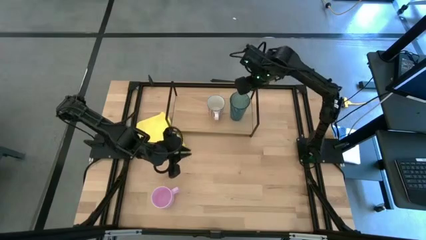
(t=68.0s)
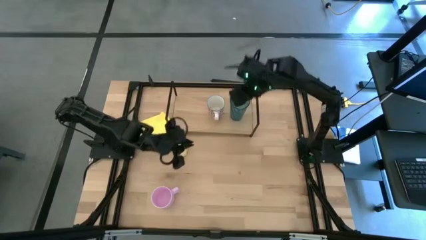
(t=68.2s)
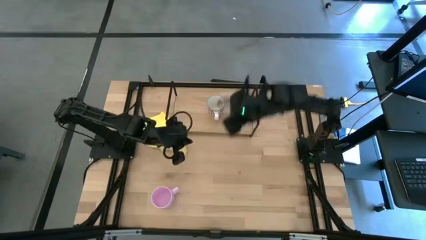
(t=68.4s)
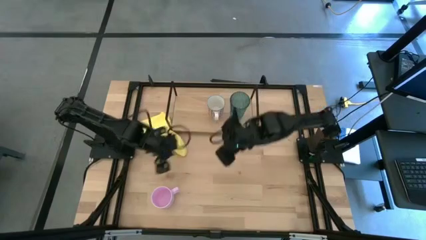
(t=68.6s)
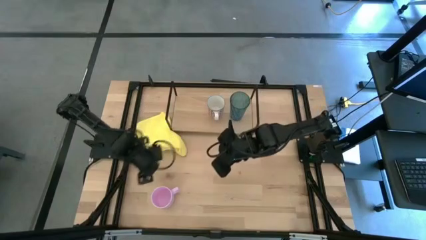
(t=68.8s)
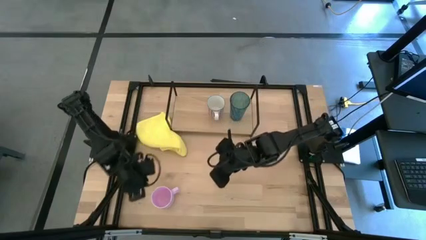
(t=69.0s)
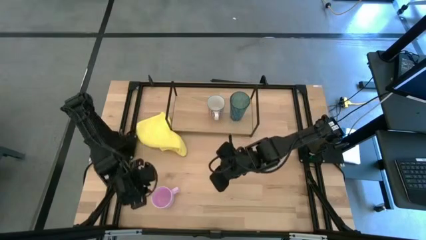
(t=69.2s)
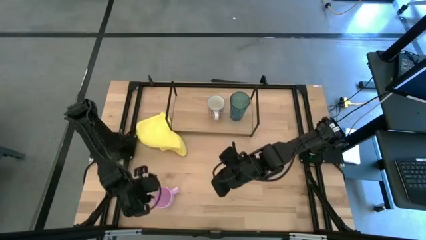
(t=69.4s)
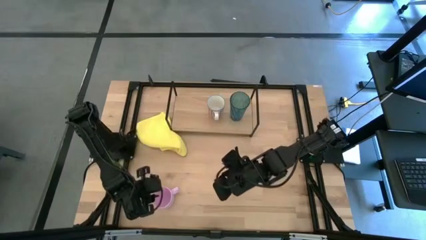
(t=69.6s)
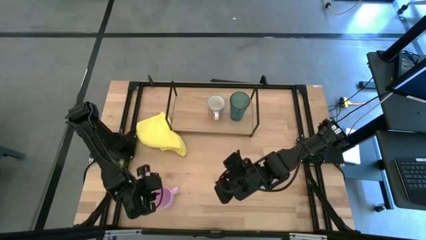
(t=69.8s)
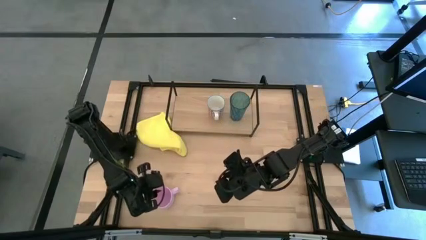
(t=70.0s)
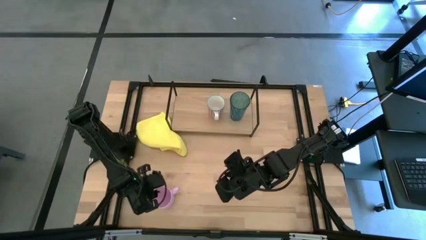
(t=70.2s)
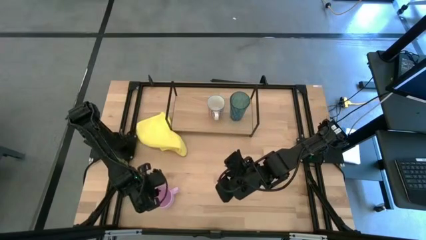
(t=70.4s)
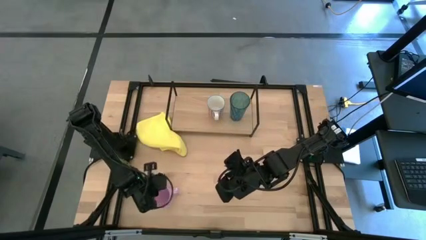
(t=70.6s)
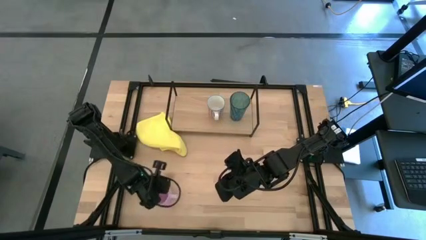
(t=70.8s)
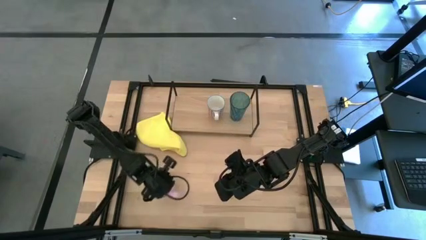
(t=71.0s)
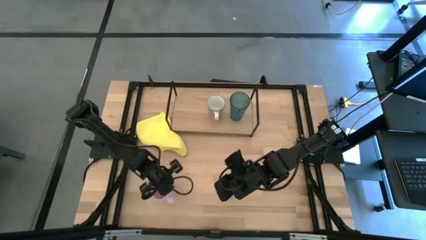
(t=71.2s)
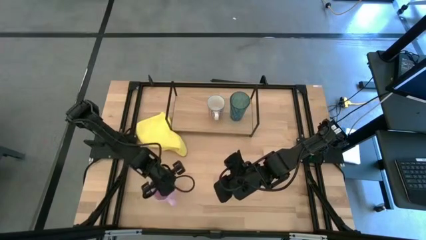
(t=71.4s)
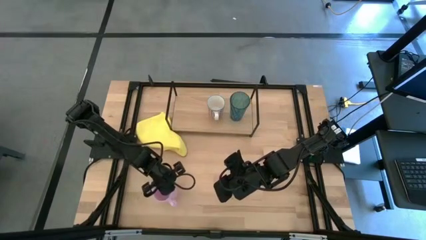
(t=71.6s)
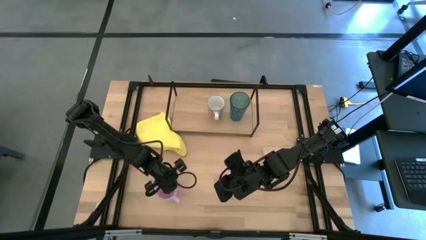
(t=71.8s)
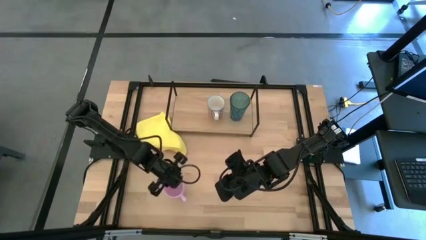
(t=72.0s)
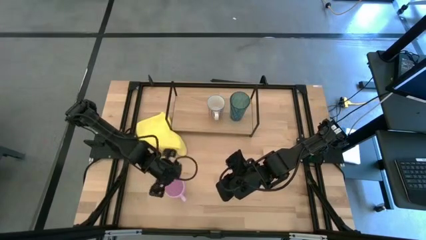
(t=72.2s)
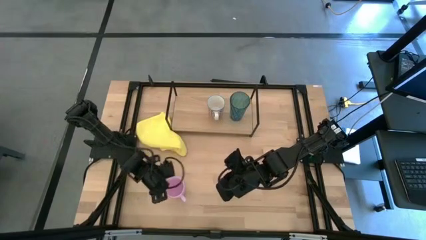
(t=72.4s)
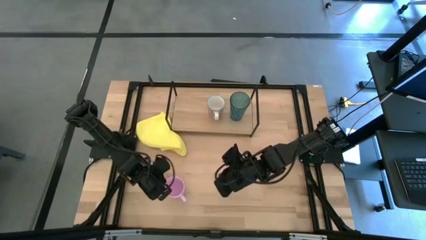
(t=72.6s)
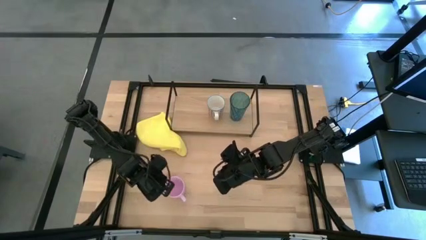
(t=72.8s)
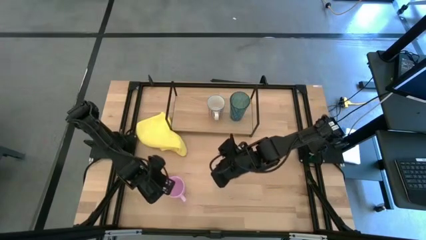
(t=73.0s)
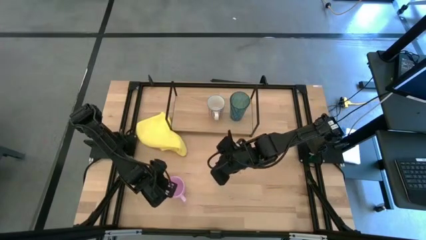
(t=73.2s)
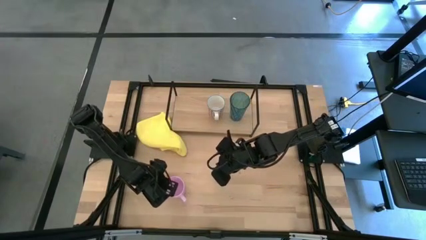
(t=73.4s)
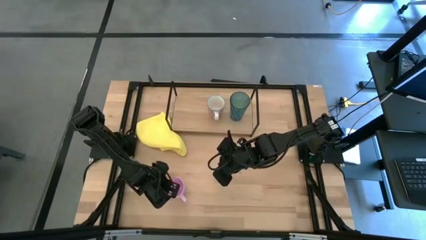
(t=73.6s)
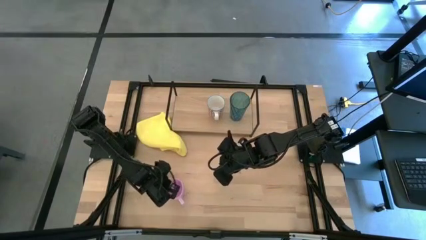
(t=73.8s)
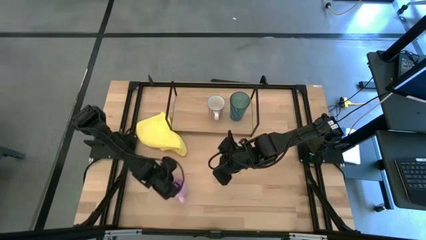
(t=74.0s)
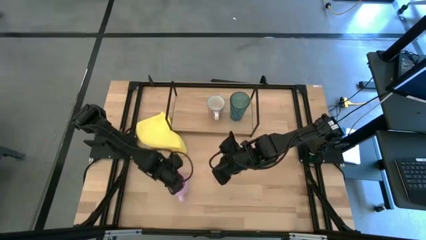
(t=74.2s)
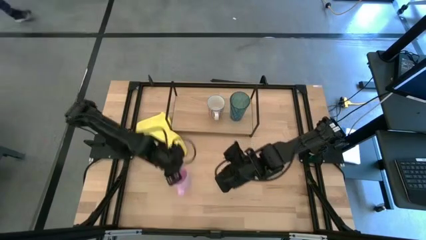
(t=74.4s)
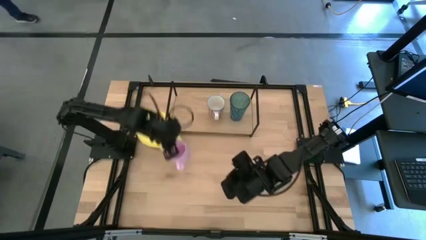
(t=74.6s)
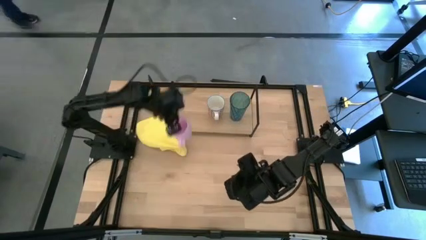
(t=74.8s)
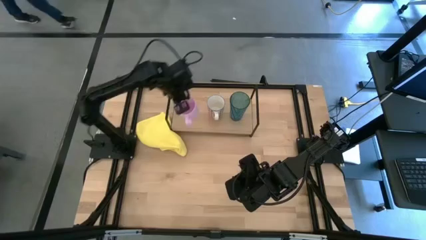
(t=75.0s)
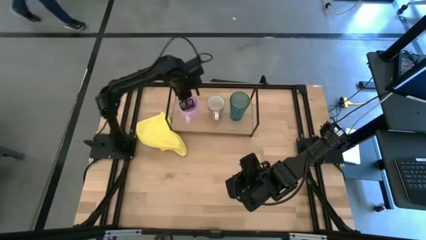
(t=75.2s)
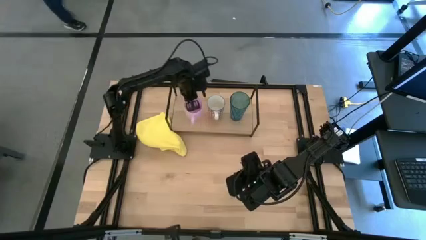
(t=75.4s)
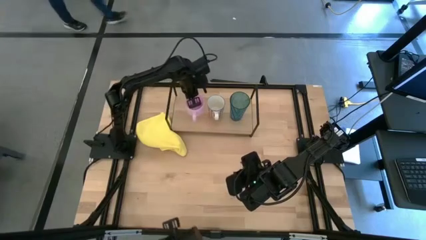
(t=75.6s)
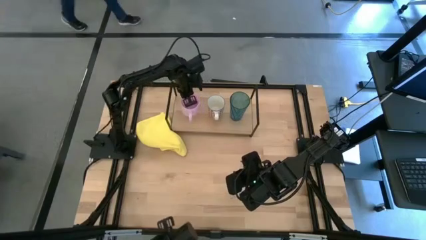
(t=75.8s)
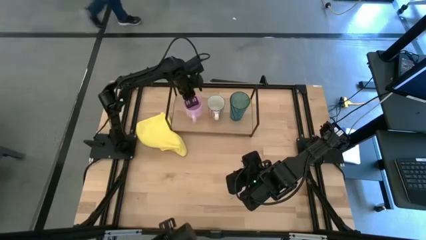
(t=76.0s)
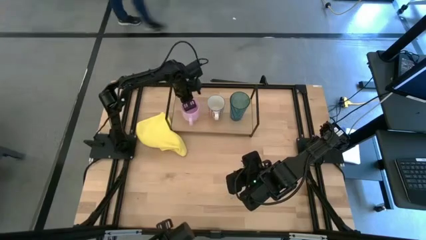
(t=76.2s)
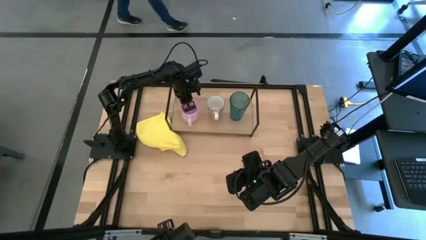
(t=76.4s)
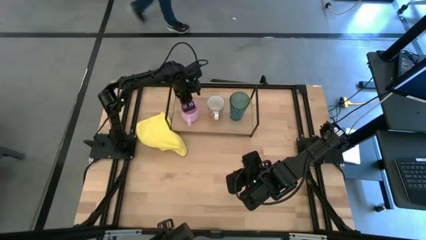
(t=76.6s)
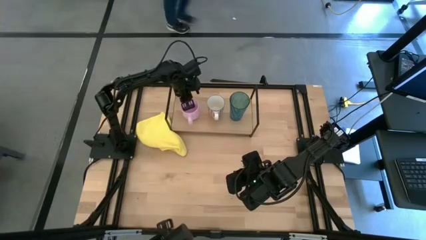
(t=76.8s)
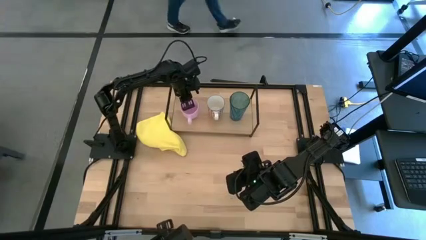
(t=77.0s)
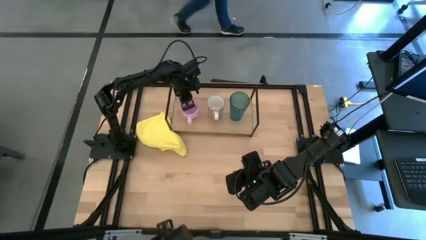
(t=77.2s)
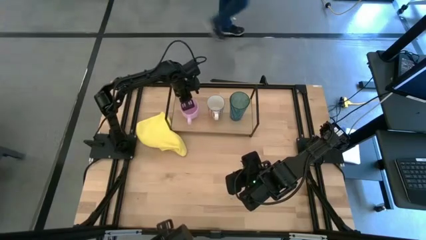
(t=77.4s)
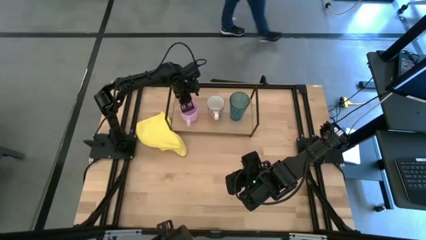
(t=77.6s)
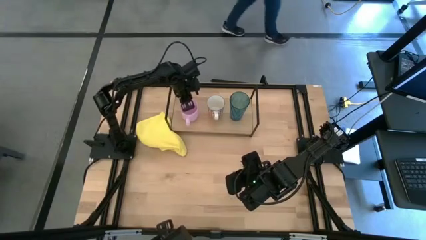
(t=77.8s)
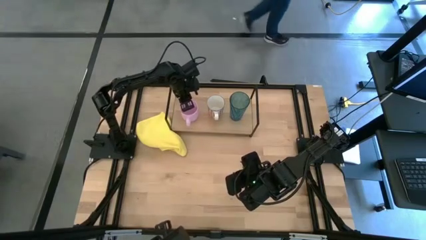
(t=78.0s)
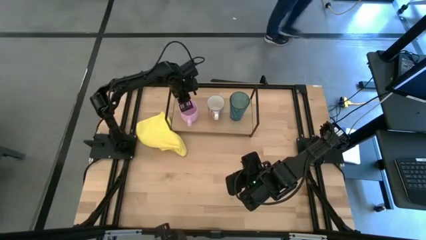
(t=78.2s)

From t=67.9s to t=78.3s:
Task: Stack small to large cups/mugs on shelf
Put the pink mug on the shelf

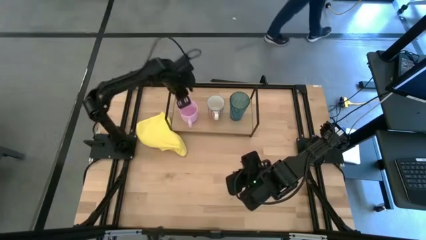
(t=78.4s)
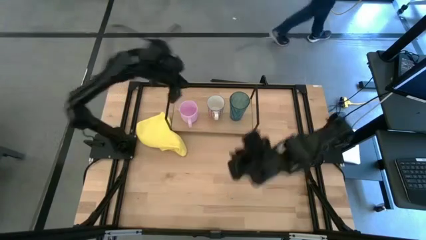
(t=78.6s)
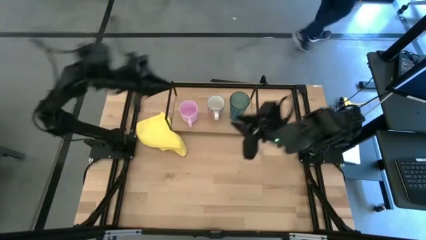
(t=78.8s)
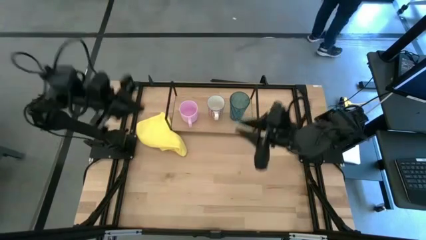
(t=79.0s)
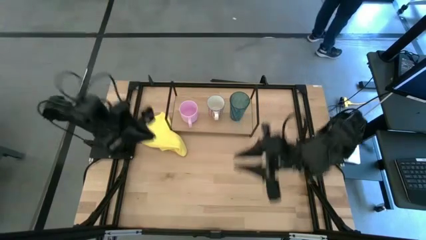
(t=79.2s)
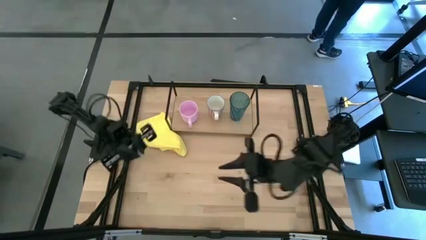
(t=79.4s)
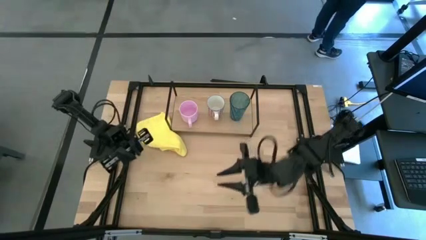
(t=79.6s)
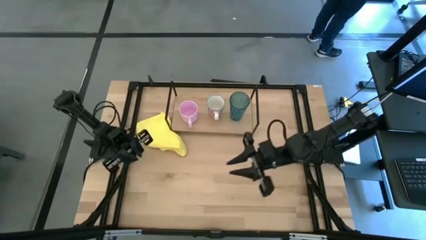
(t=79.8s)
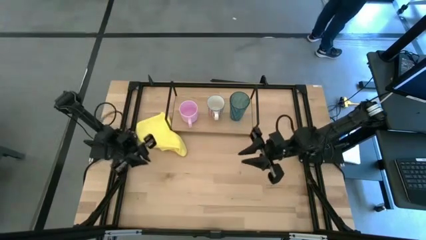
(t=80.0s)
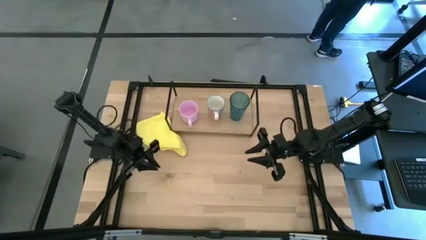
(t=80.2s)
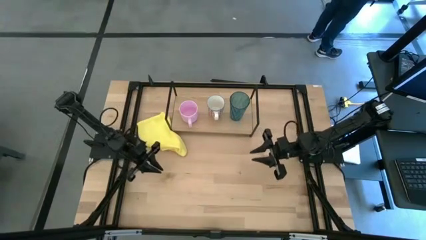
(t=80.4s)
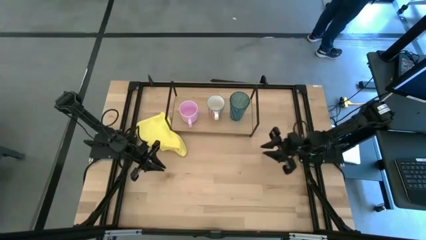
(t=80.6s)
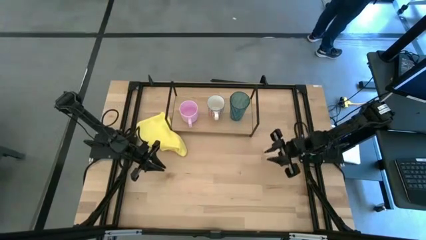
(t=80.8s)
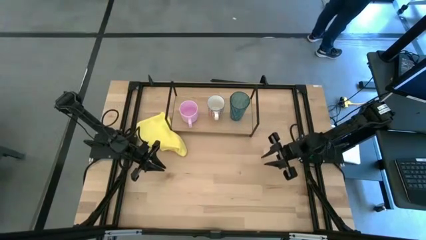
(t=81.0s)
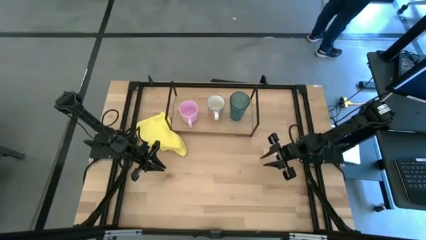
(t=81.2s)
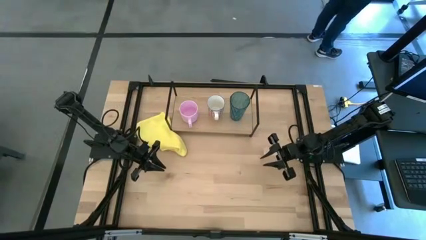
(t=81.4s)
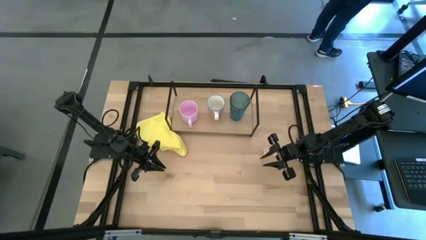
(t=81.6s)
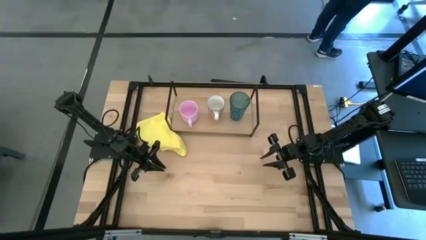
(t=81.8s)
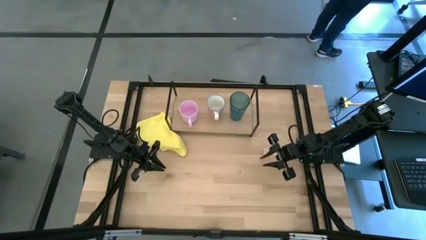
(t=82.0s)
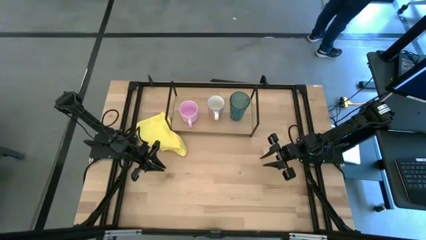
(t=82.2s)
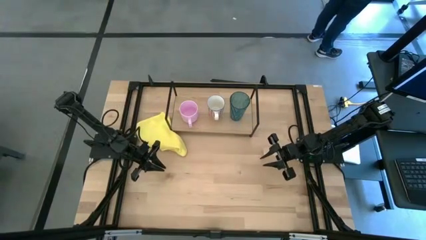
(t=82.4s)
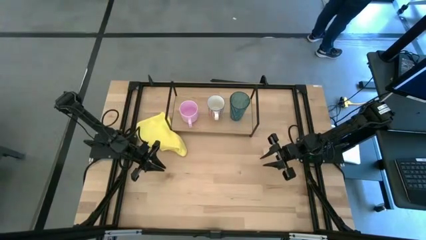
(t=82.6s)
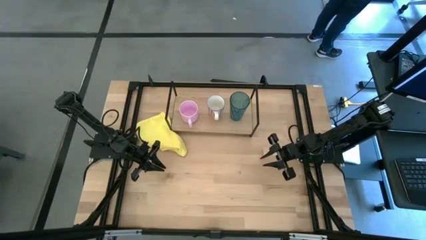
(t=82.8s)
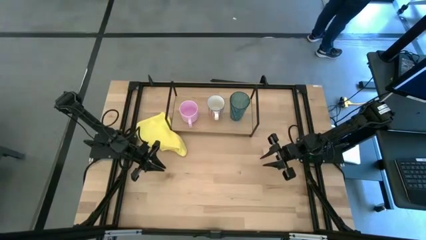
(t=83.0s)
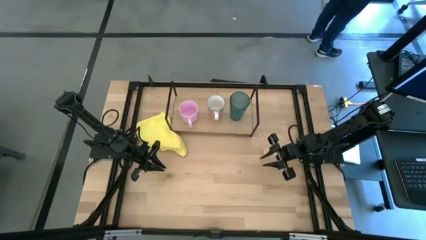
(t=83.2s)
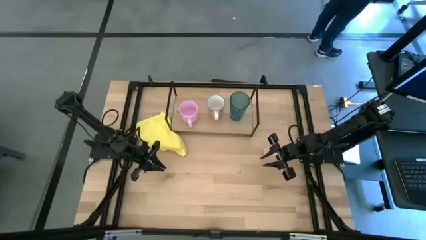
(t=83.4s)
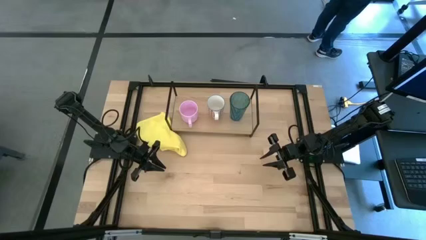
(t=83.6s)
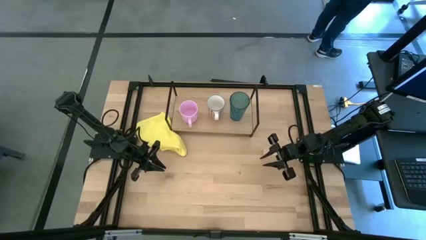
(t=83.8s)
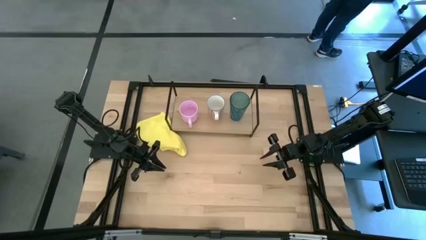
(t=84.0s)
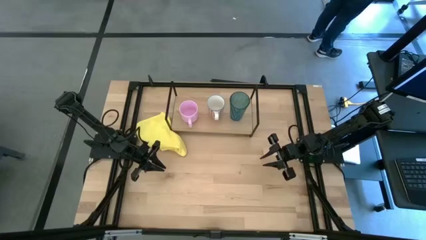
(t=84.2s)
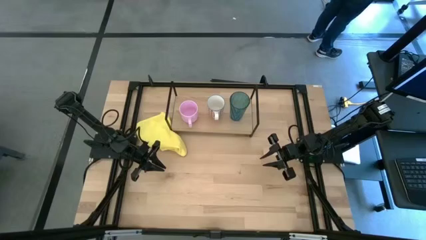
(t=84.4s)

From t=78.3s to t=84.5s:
Return to Home Position
